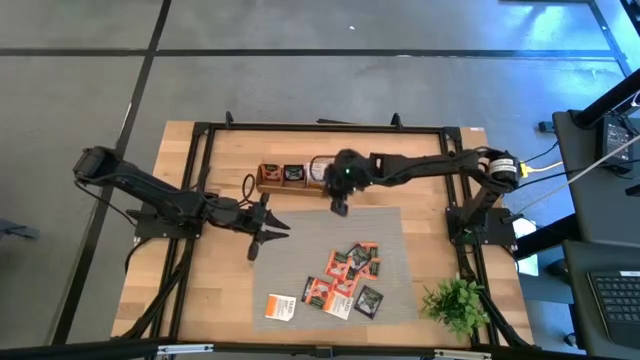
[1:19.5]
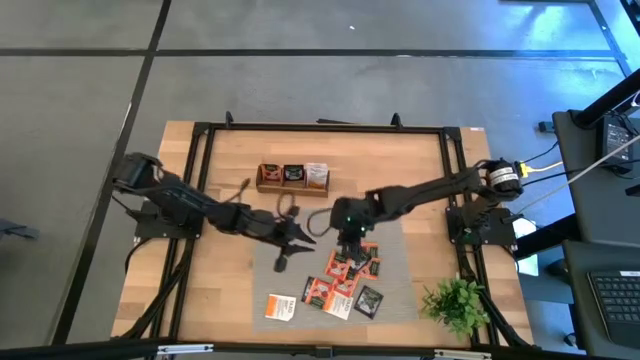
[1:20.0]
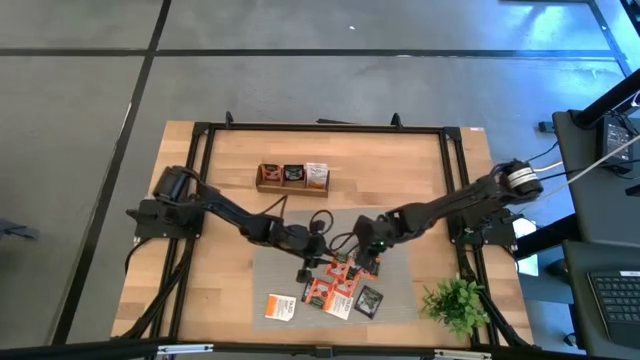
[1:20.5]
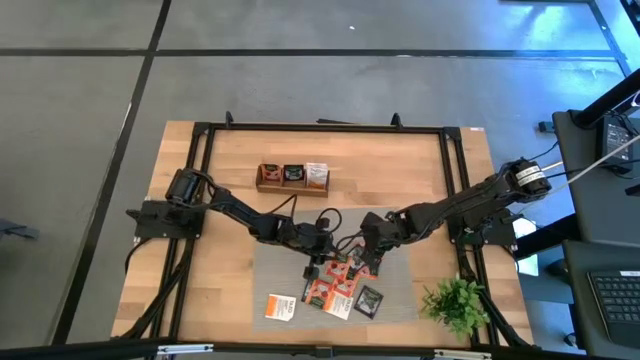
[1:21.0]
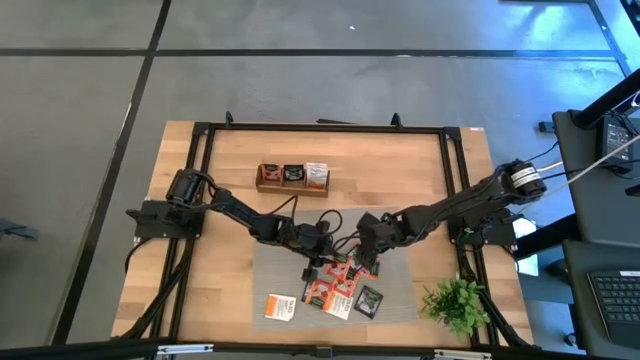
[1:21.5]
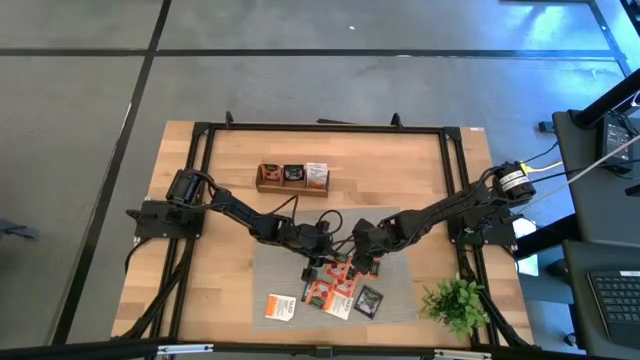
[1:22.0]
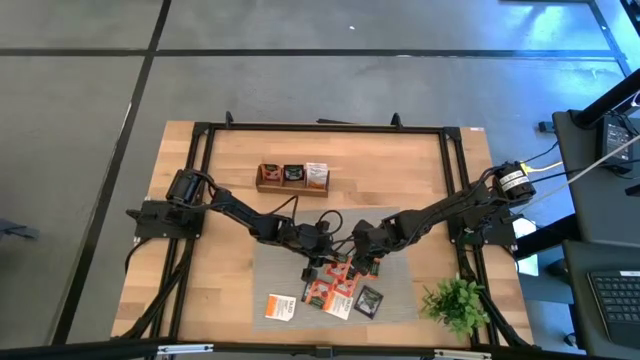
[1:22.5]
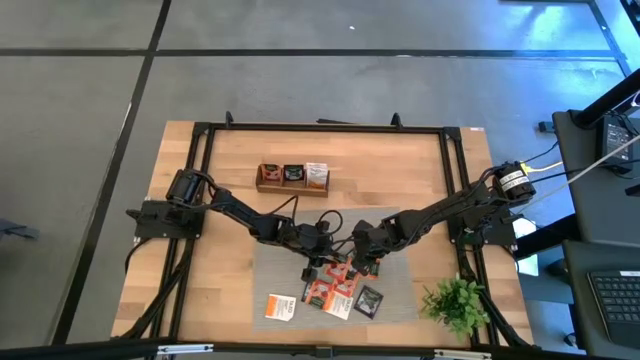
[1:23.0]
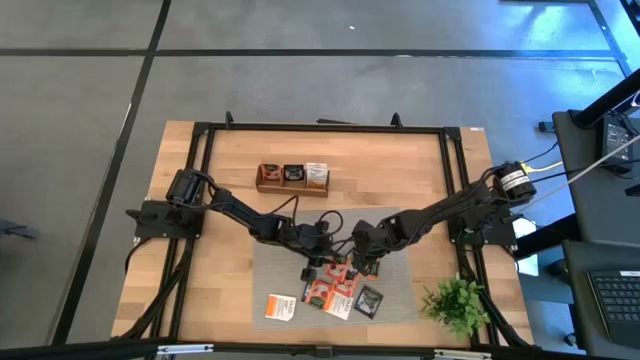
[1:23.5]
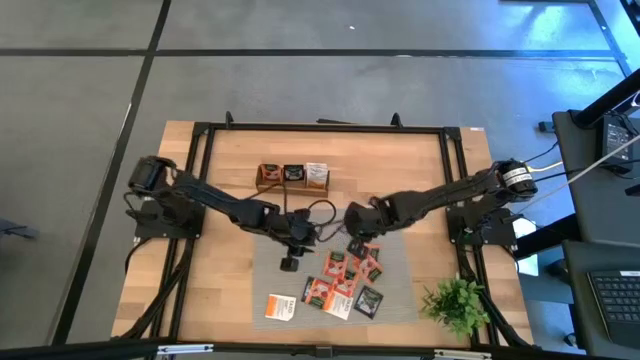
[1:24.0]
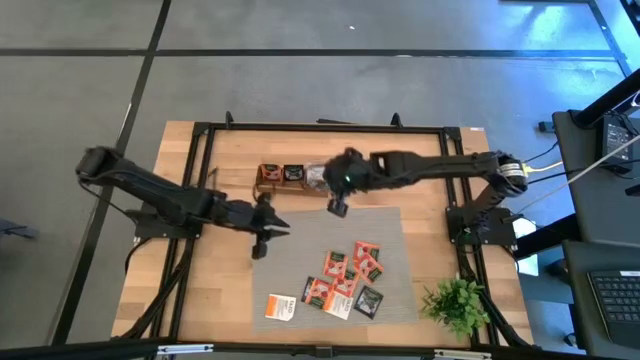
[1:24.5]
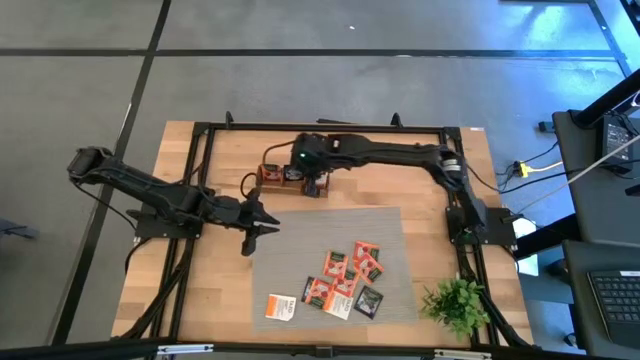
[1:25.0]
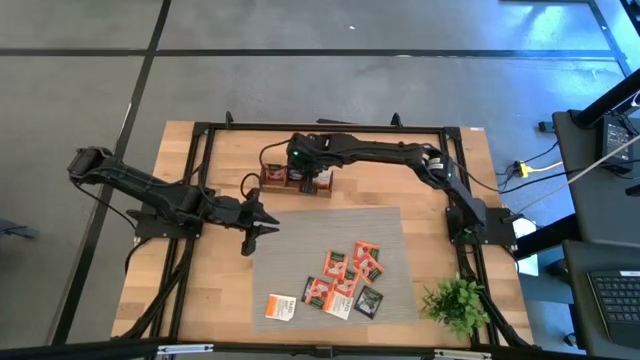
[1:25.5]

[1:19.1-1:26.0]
Task: Pick & Place Tea
Put the purple tea bag into the middle section of the wooden organizer

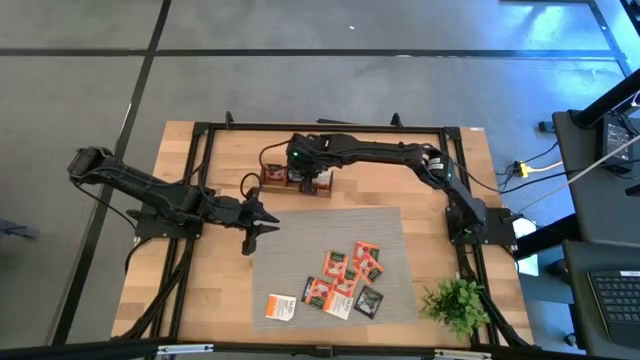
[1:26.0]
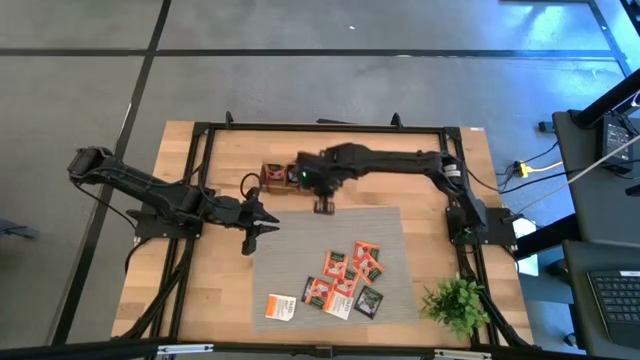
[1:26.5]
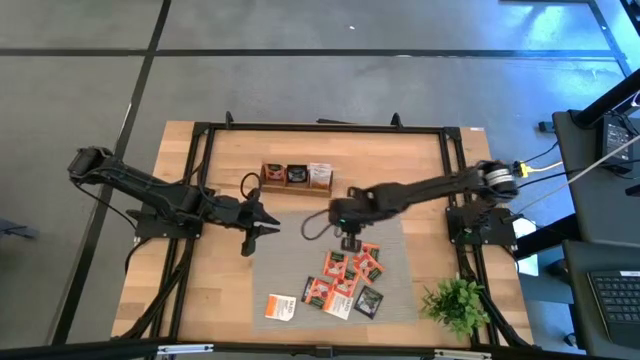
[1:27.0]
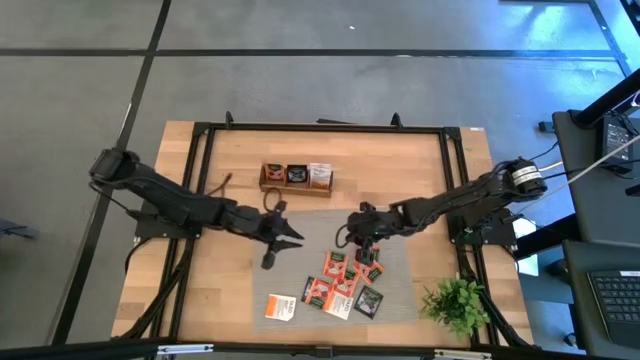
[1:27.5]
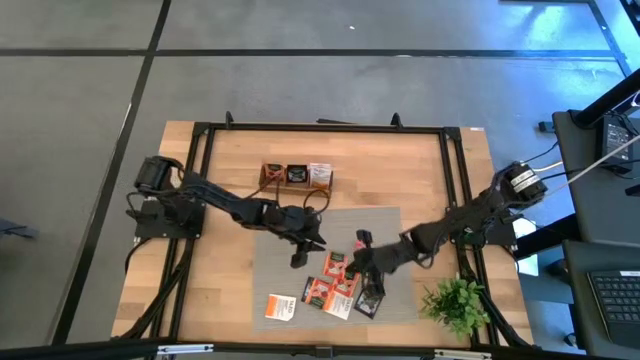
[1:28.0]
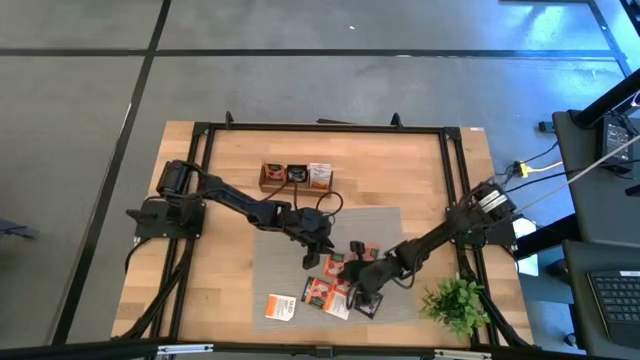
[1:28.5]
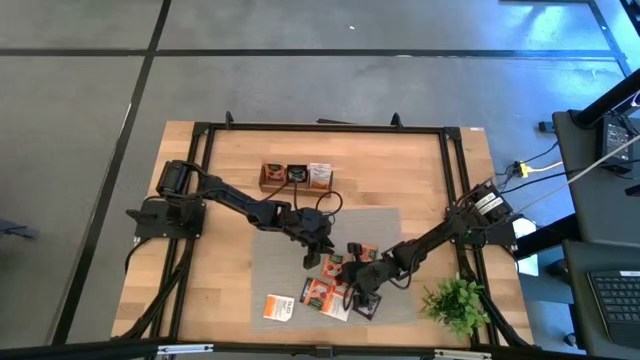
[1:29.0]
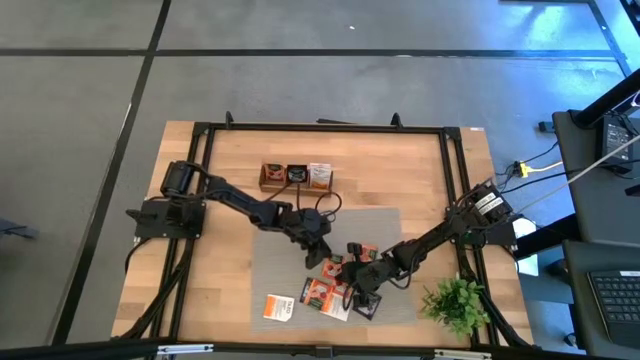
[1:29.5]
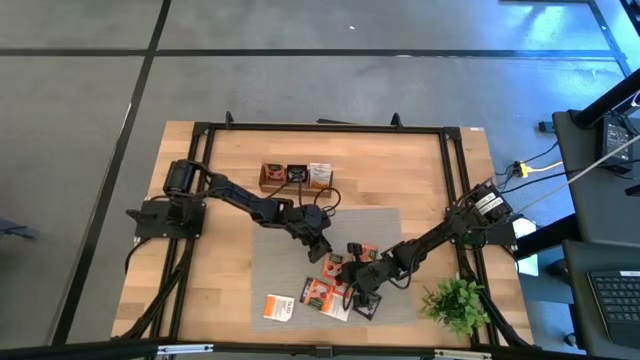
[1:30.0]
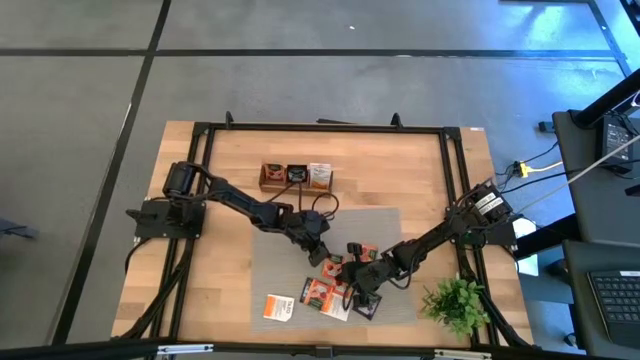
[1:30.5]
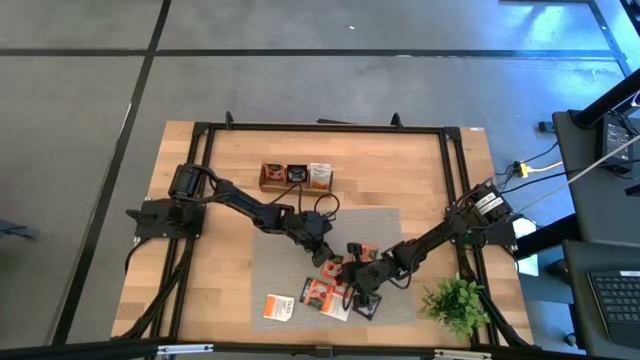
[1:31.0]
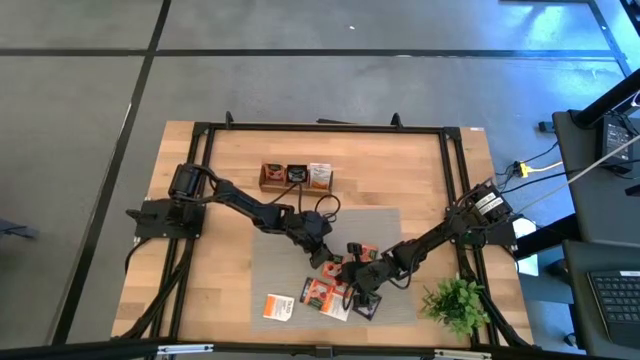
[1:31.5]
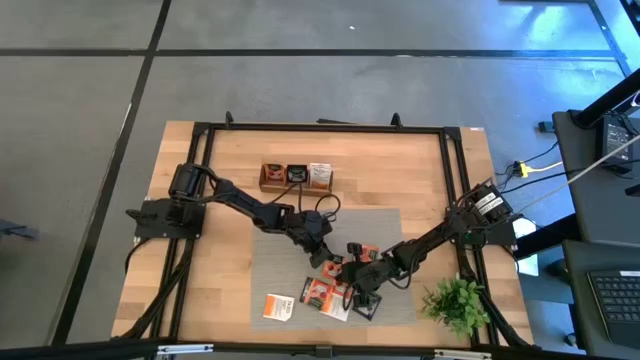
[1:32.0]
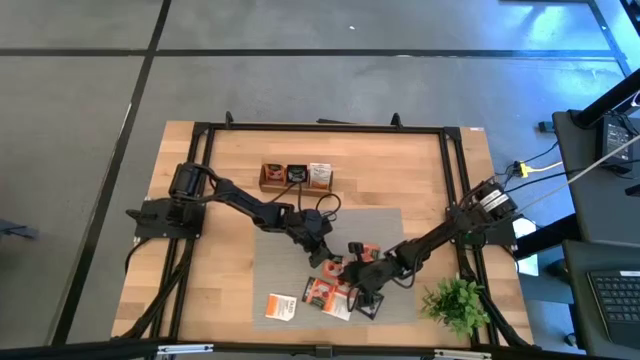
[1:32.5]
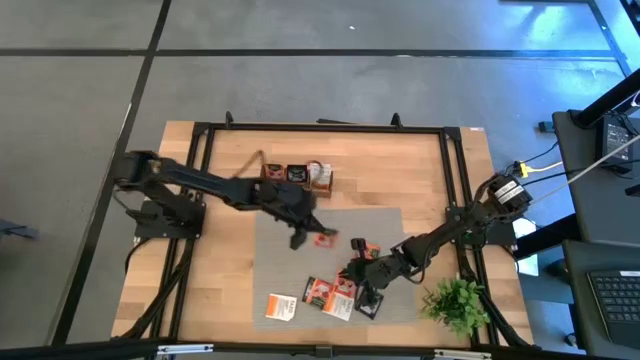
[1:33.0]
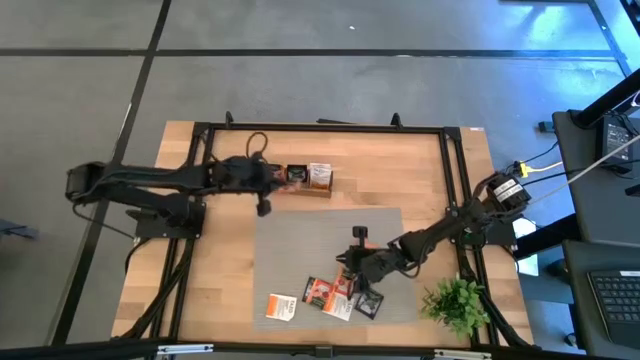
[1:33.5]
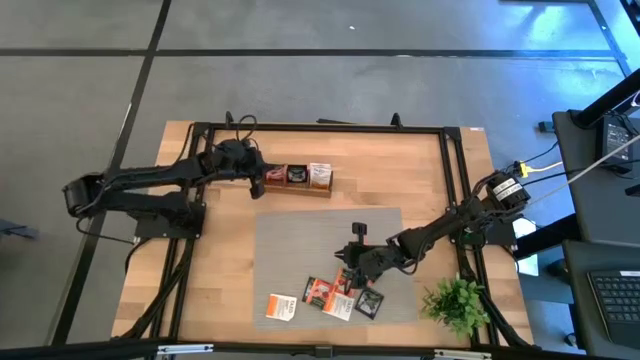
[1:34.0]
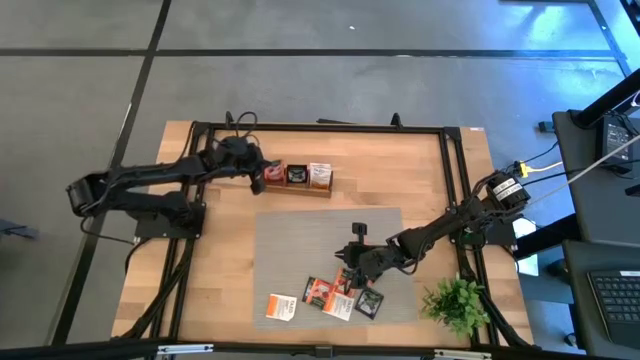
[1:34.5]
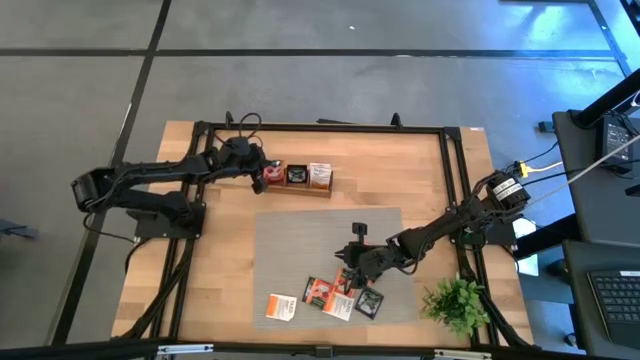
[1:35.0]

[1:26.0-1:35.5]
Put the orange tea bag into the left section of the wooden organizer

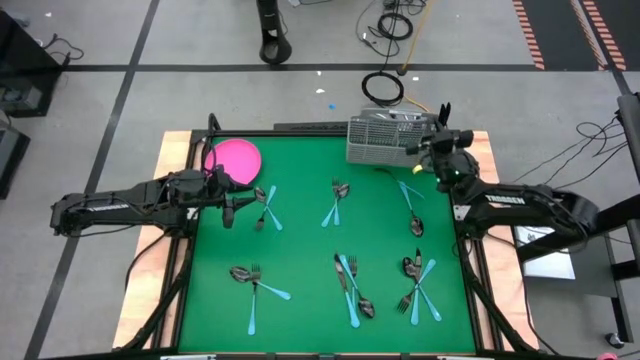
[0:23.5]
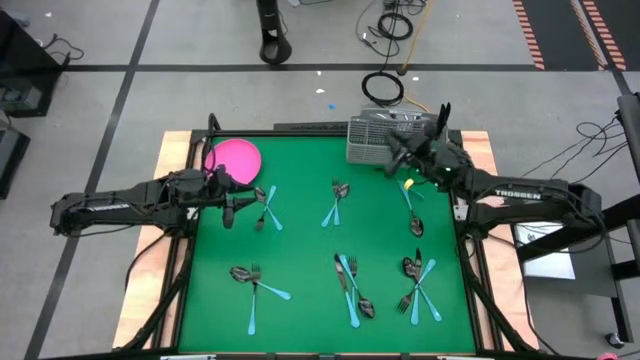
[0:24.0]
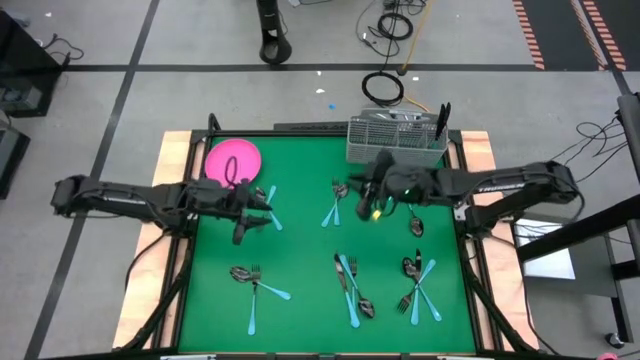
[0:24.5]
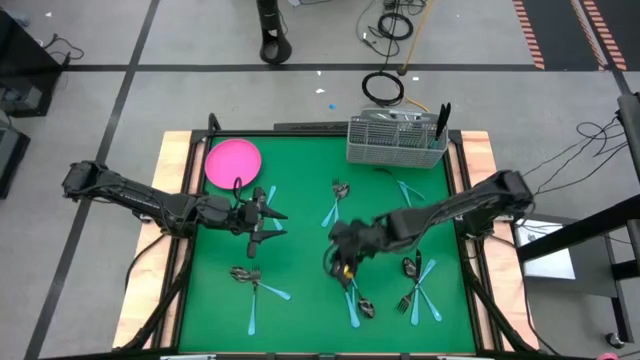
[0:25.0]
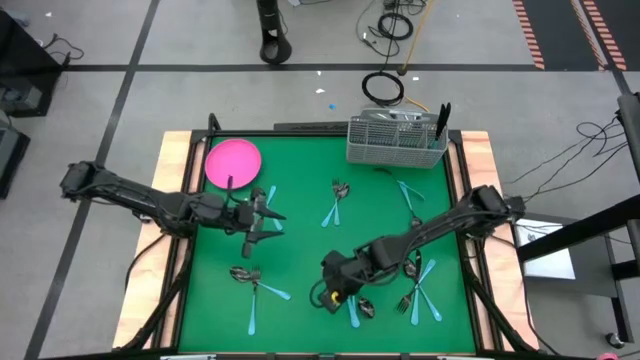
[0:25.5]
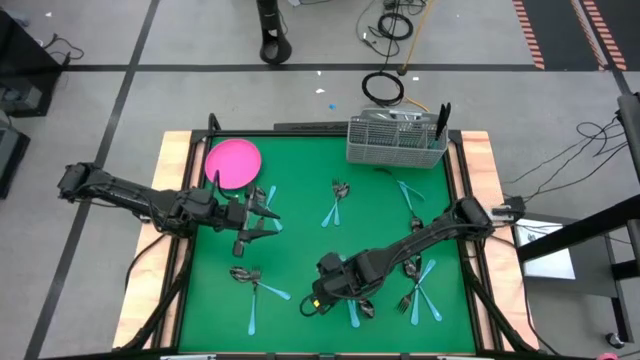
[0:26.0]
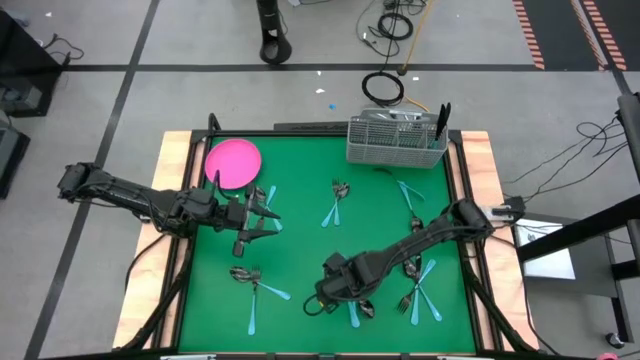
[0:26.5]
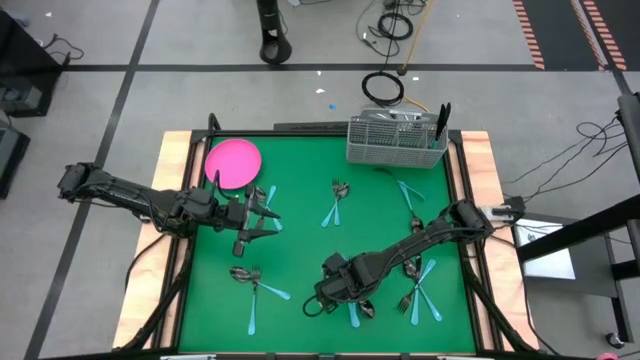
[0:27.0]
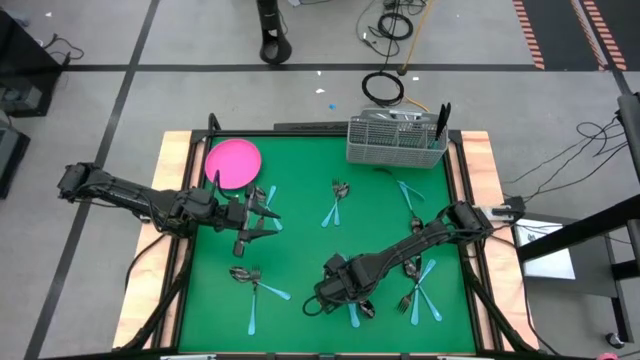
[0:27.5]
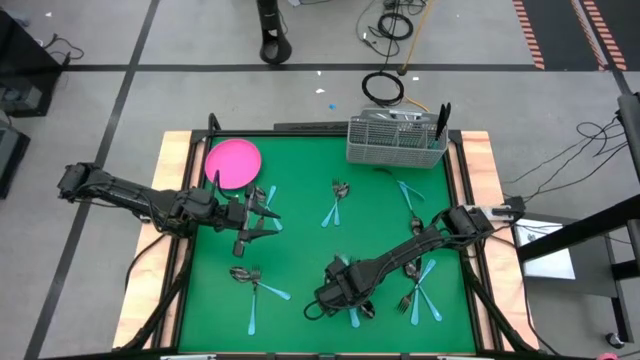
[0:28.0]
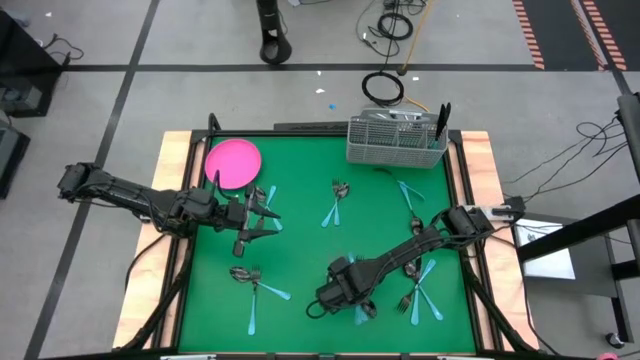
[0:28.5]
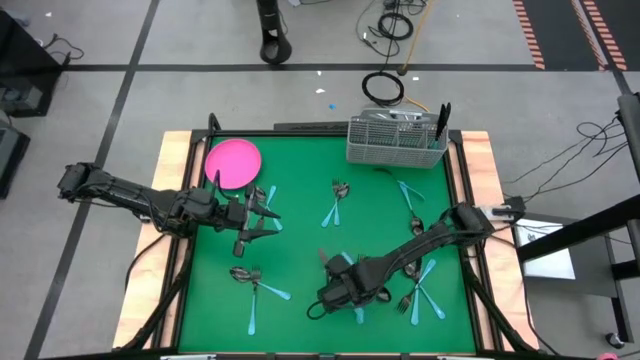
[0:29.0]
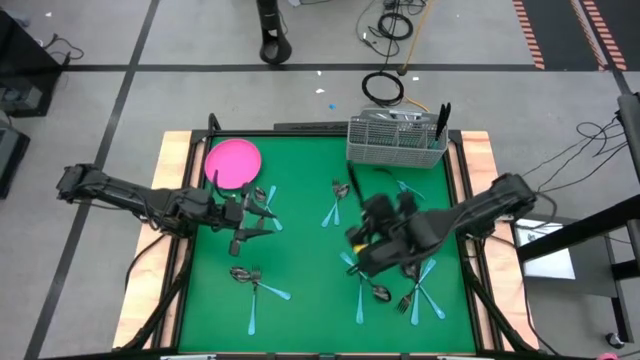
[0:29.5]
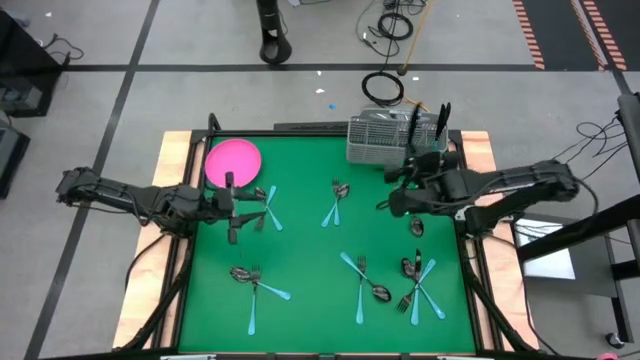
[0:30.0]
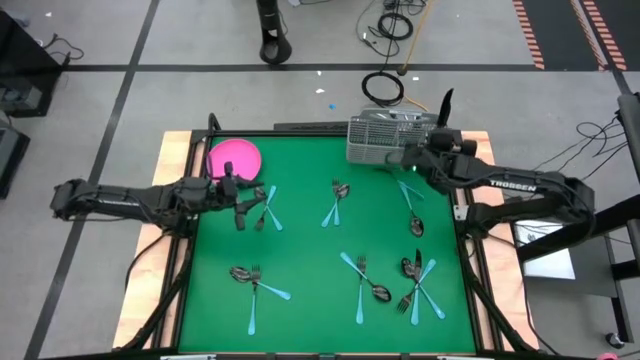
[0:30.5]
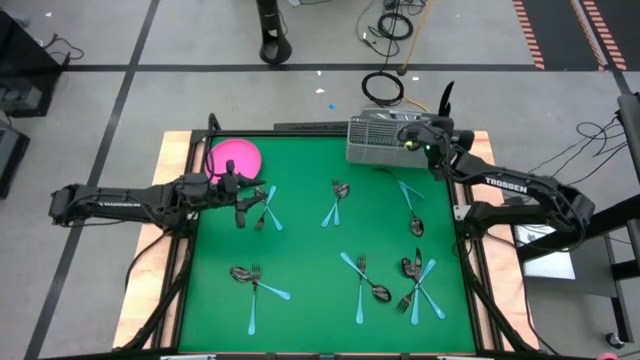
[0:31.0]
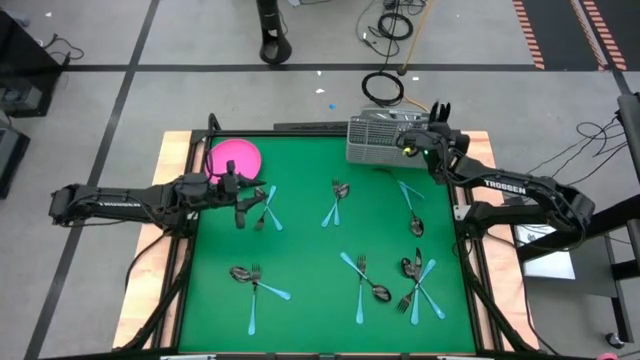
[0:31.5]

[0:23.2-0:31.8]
Task: Sort silverware
Put the blue table knife into the gray silverware basket
